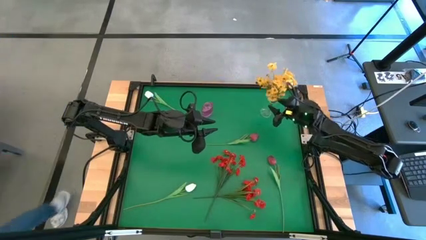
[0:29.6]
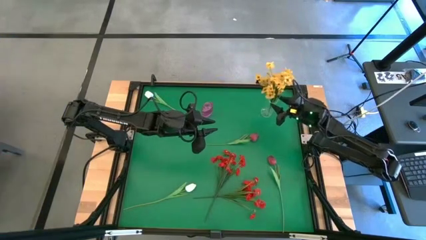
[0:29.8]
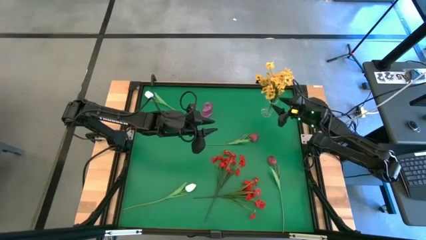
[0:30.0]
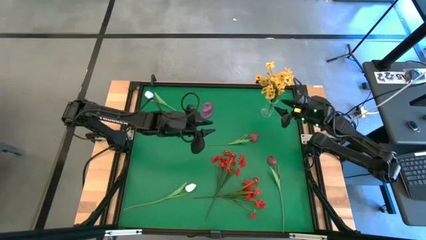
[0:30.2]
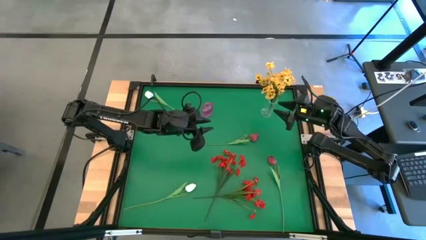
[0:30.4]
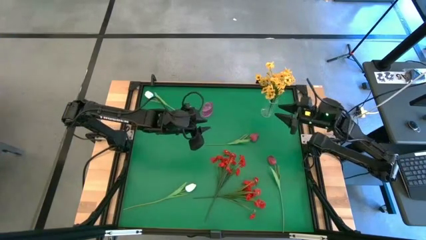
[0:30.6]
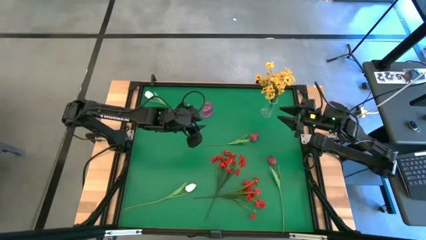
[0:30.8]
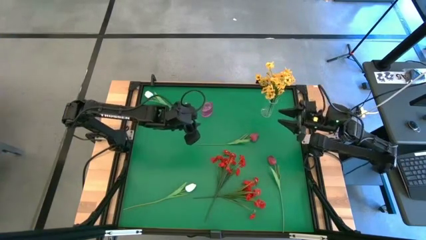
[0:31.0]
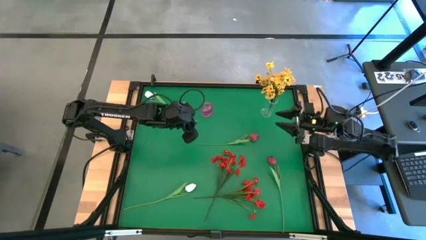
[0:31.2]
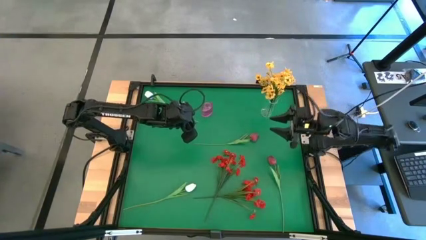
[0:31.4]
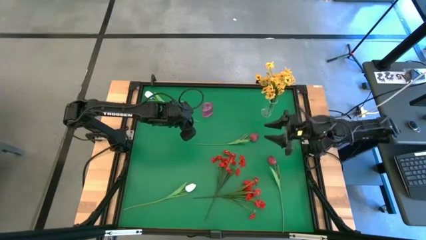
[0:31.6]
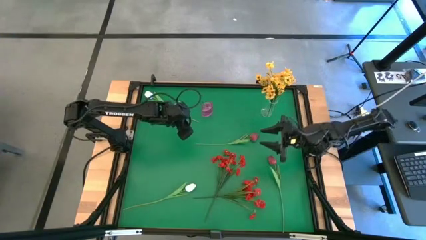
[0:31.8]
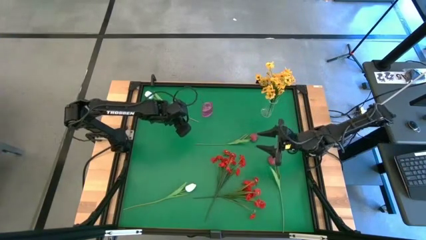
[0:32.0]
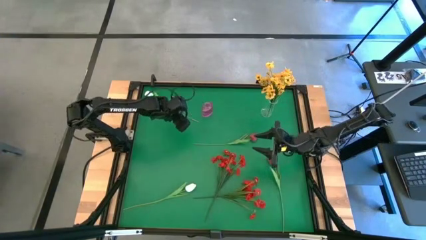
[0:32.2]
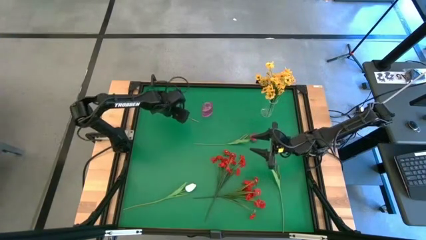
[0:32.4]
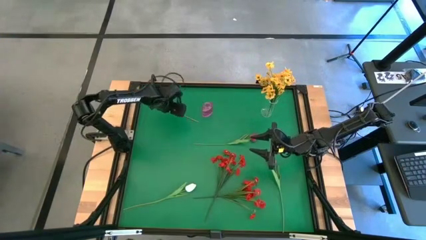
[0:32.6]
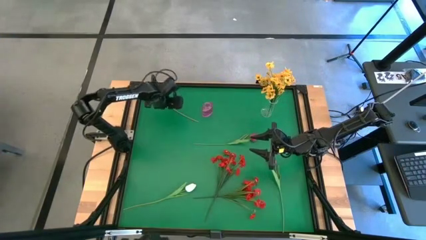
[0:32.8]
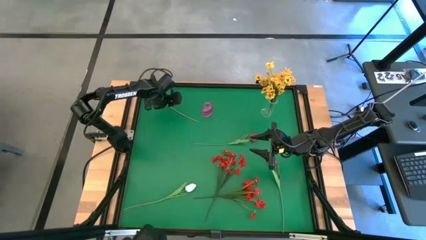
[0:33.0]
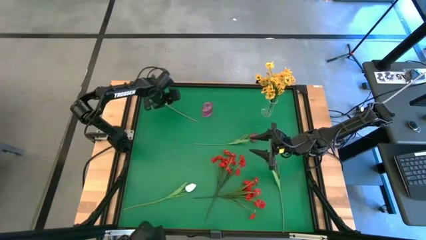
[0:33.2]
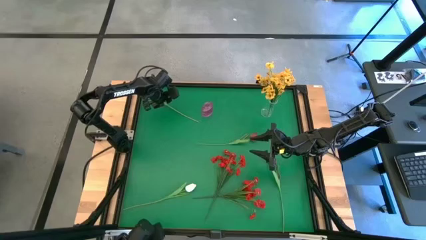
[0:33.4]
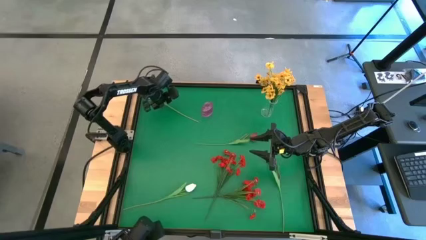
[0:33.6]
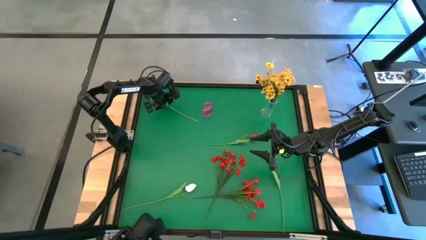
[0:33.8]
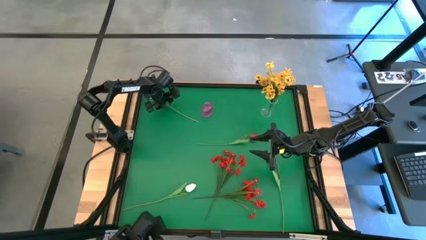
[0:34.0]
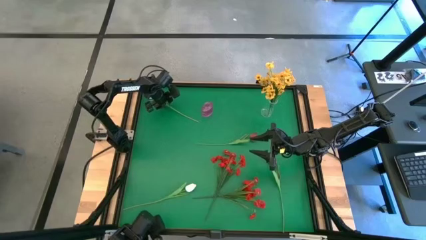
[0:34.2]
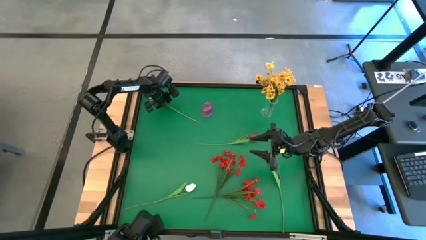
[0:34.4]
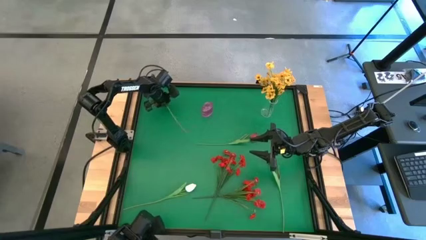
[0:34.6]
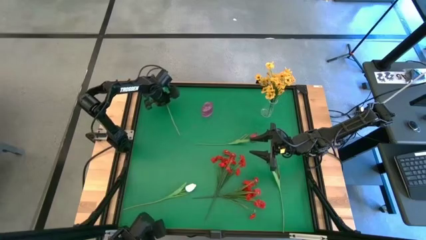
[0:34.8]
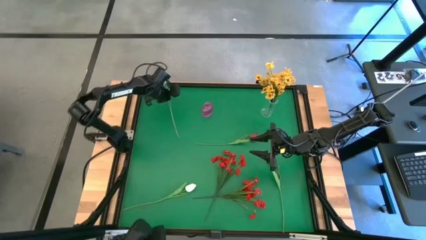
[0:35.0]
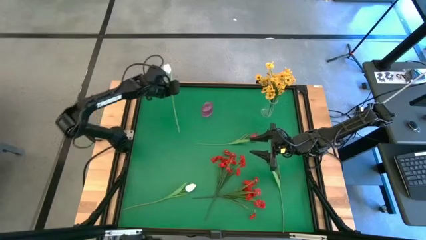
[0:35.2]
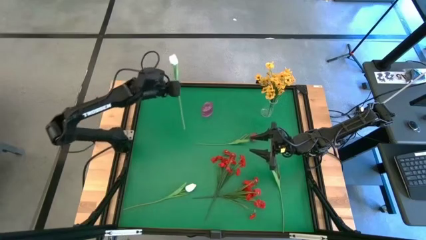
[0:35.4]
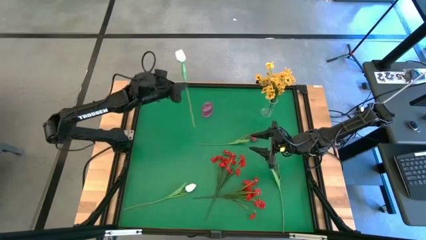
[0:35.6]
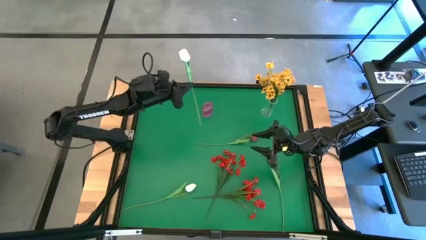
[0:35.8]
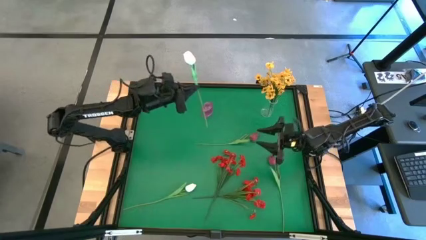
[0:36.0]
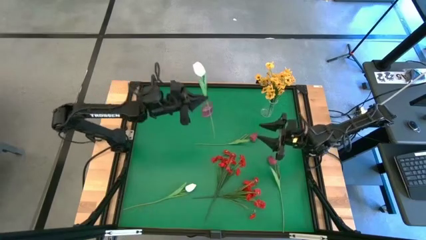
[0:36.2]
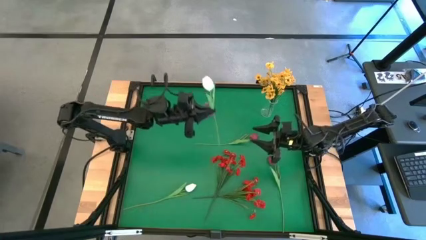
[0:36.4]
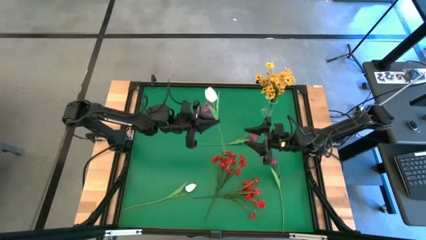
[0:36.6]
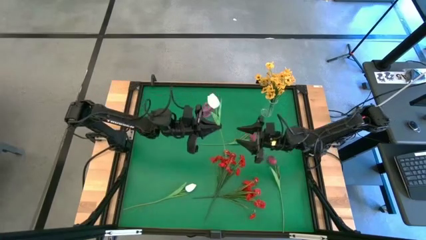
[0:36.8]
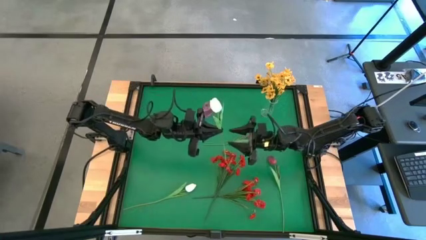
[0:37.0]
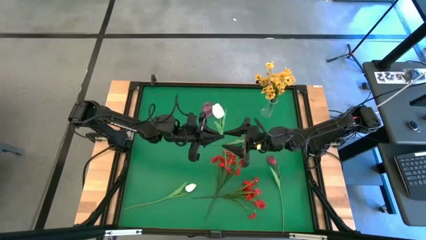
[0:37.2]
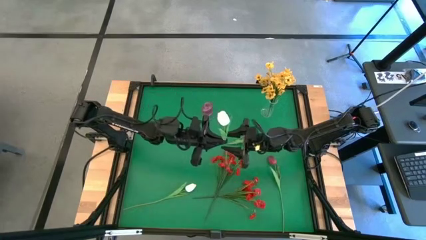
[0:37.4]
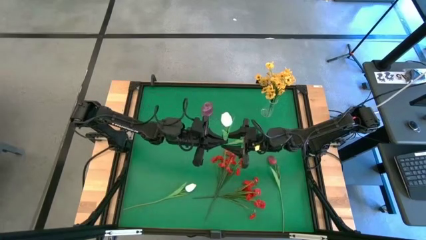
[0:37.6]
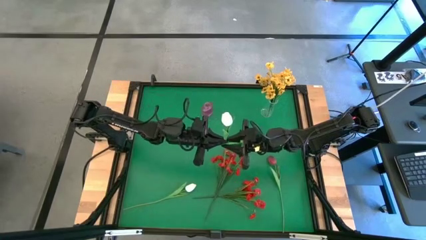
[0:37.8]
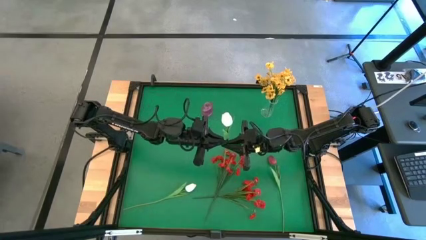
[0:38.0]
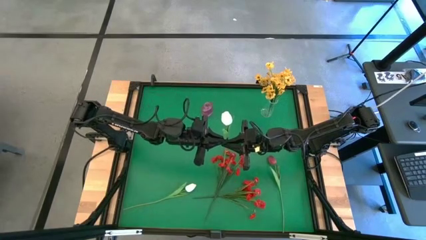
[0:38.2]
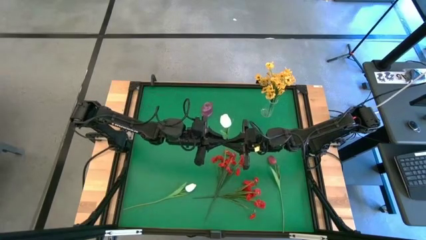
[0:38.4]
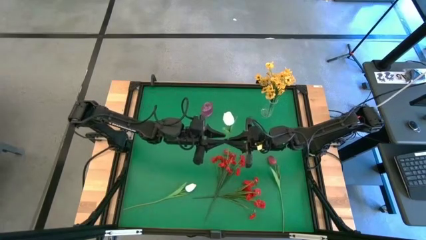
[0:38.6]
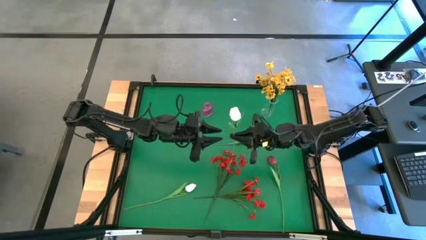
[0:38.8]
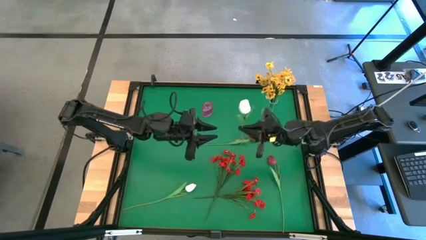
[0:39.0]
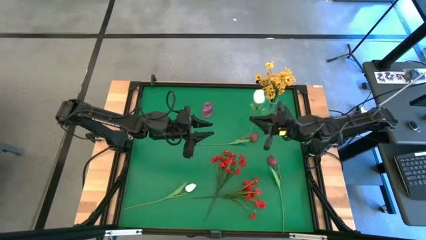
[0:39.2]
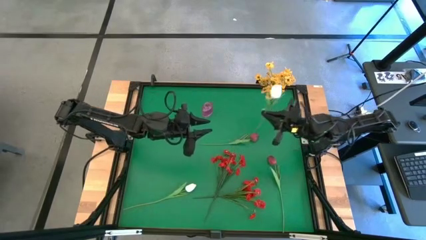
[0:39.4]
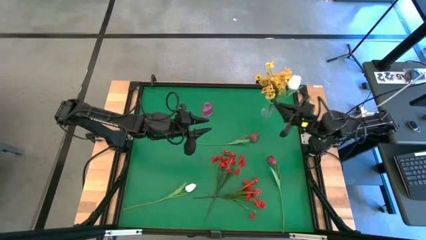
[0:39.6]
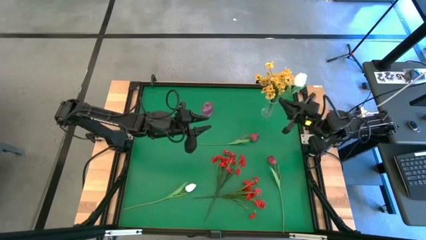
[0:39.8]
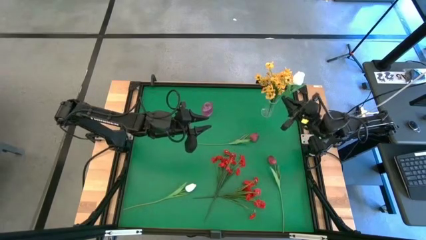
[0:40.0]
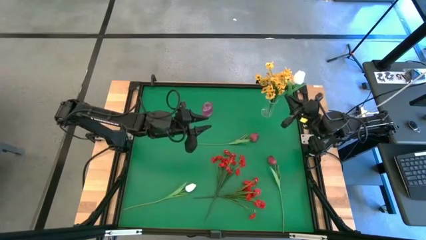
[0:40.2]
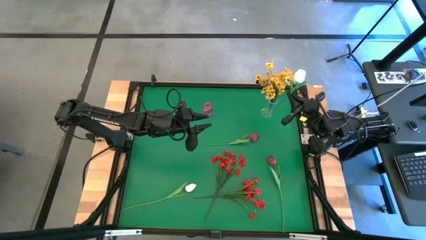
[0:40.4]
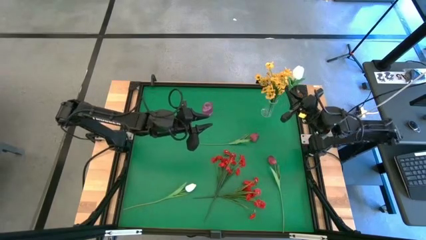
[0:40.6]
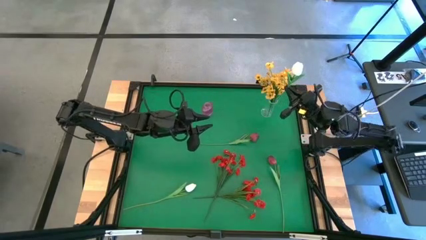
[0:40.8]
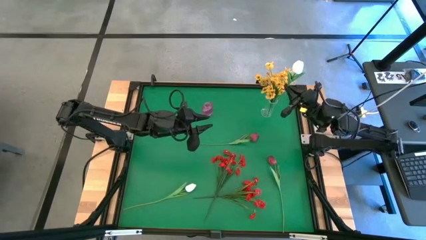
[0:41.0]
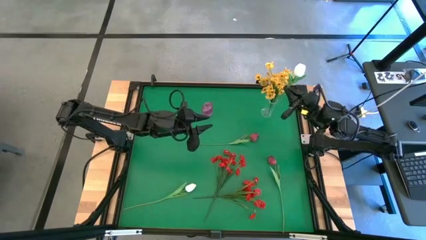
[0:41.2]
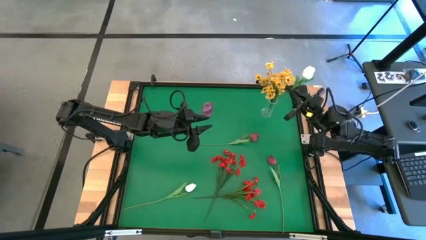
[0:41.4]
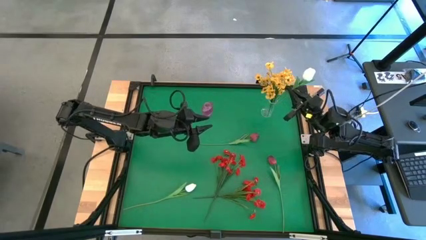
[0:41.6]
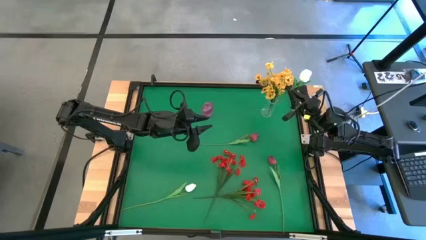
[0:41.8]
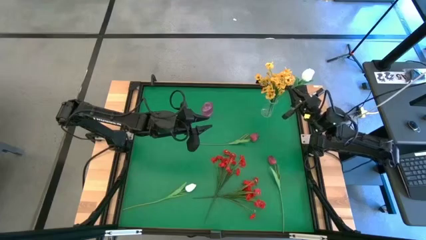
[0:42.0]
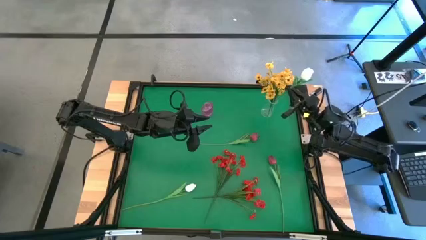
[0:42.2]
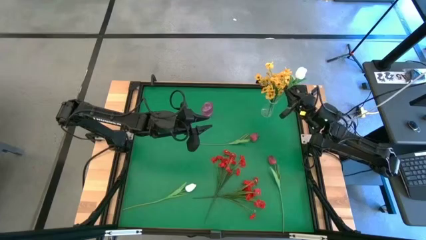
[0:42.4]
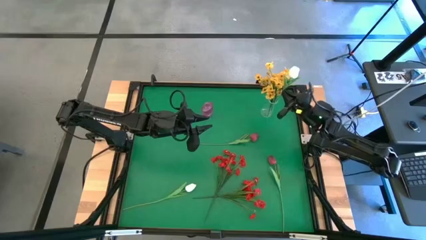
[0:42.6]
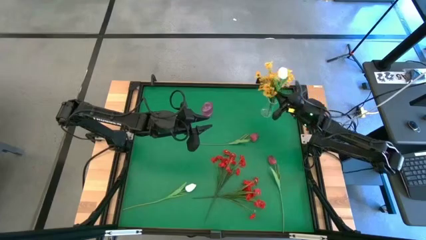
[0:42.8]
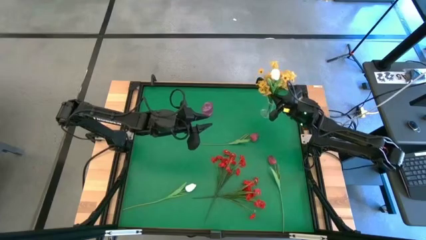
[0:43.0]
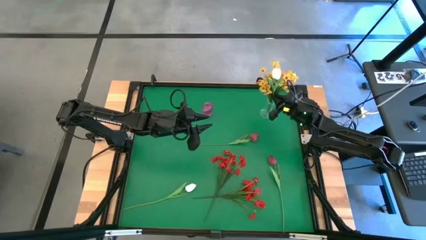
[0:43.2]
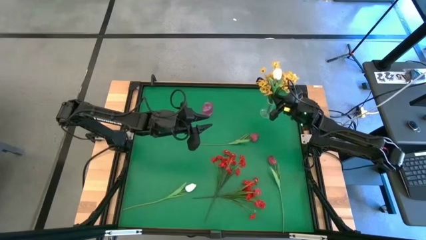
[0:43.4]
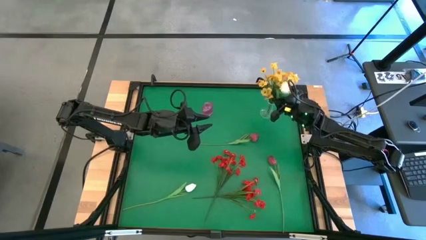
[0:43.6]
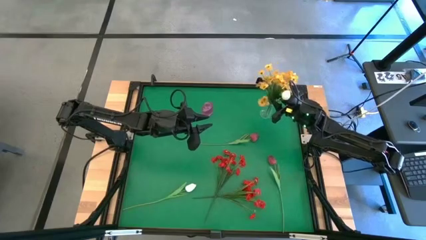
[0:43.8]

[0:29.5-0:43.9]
Task: Sort flowers into vase by color
Put the top white flower into the transparent vase
